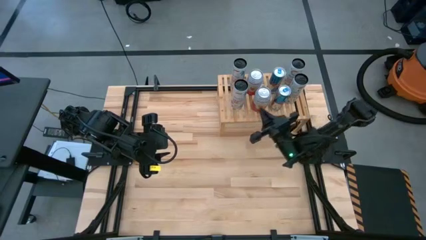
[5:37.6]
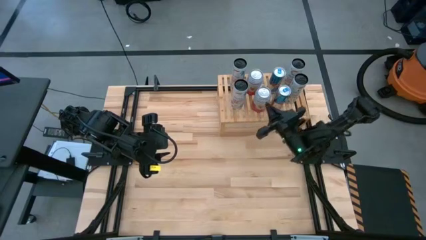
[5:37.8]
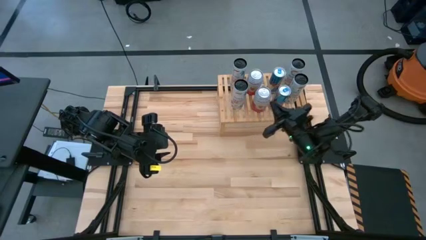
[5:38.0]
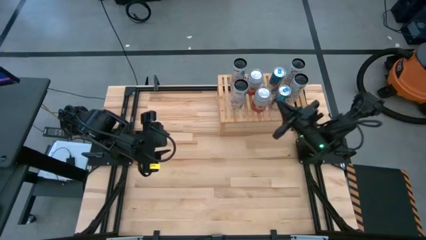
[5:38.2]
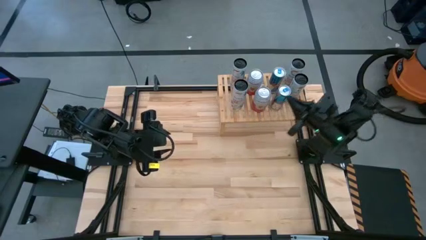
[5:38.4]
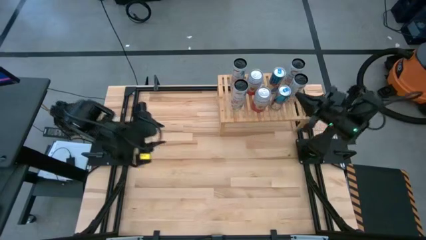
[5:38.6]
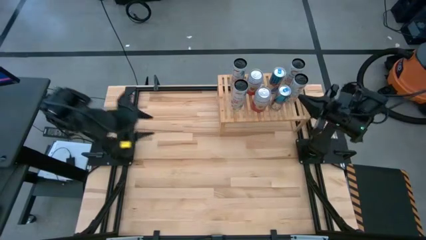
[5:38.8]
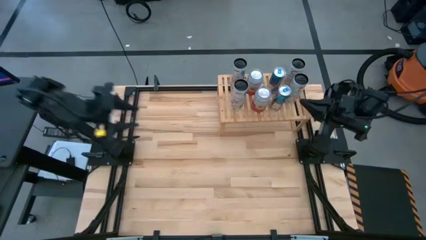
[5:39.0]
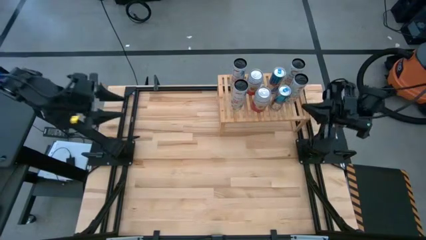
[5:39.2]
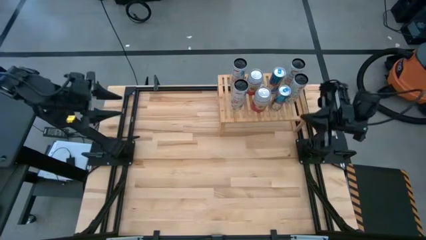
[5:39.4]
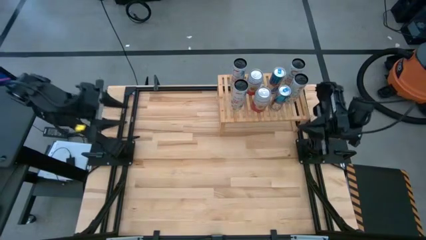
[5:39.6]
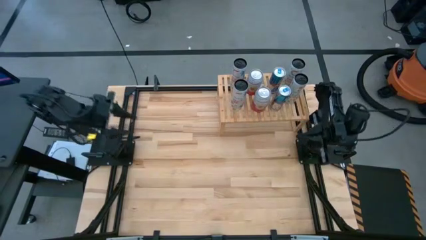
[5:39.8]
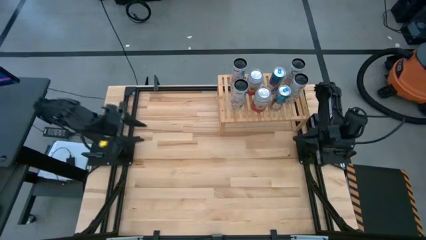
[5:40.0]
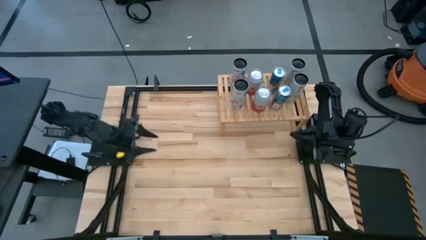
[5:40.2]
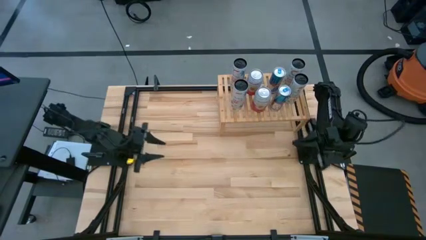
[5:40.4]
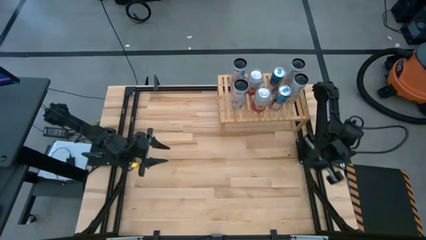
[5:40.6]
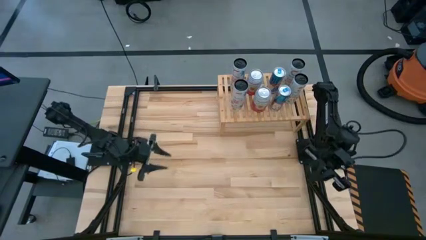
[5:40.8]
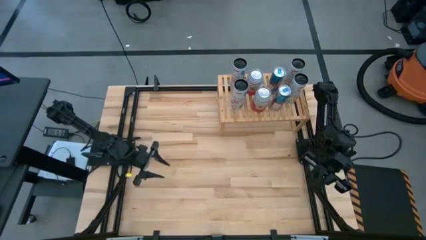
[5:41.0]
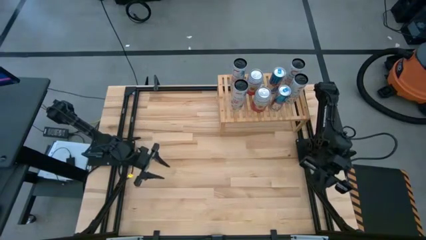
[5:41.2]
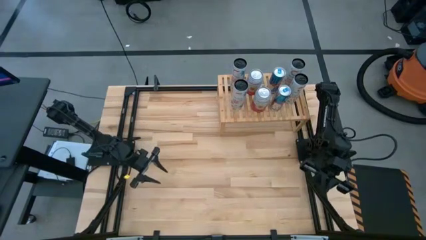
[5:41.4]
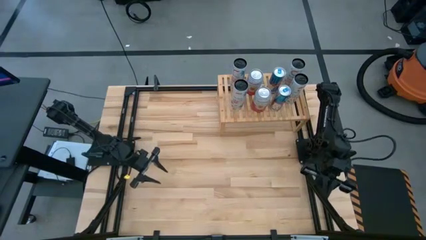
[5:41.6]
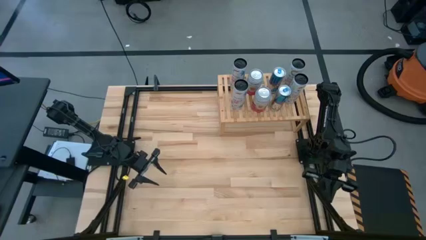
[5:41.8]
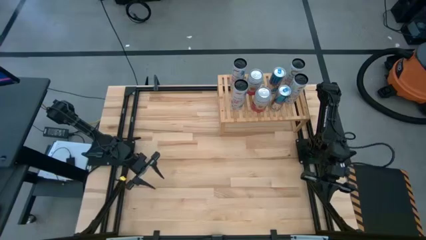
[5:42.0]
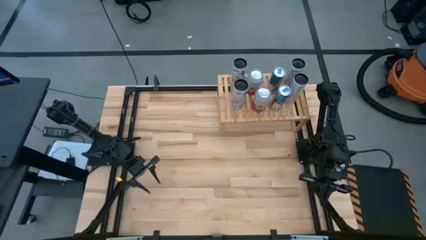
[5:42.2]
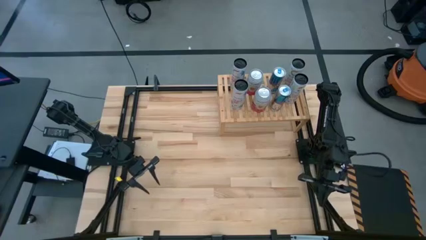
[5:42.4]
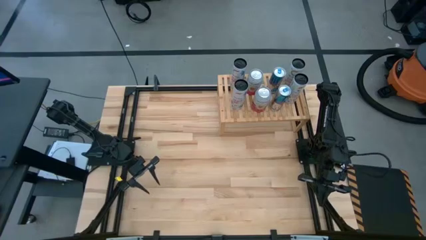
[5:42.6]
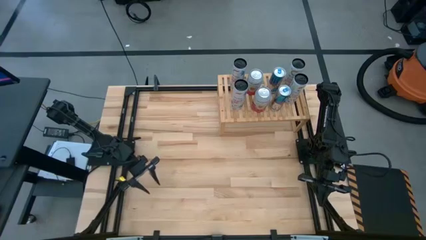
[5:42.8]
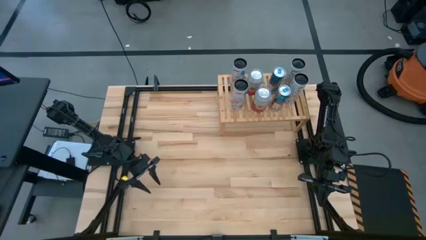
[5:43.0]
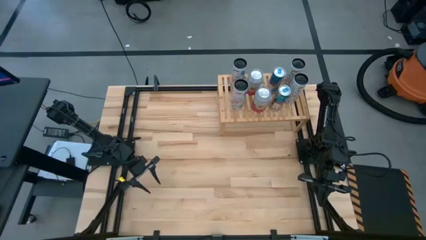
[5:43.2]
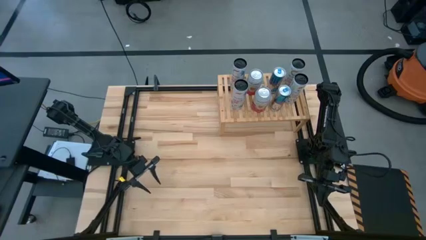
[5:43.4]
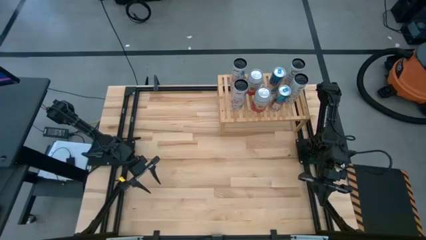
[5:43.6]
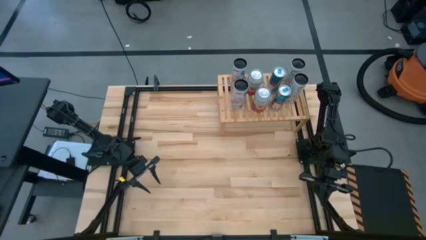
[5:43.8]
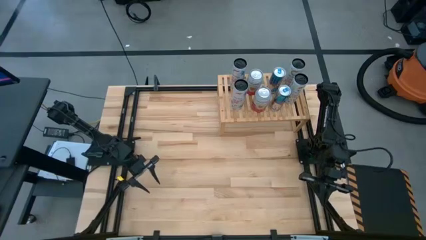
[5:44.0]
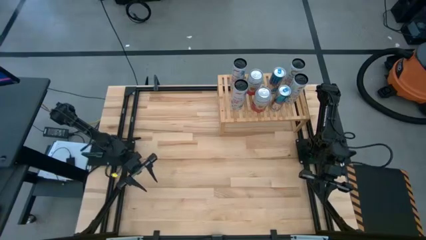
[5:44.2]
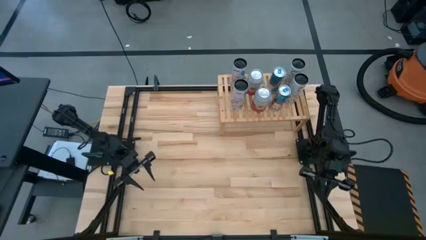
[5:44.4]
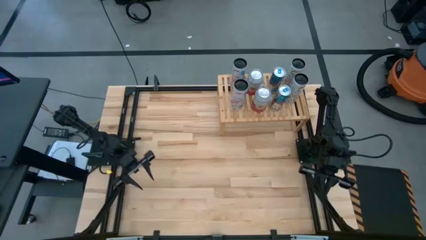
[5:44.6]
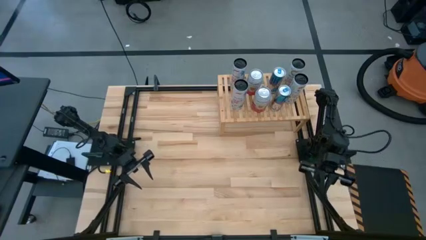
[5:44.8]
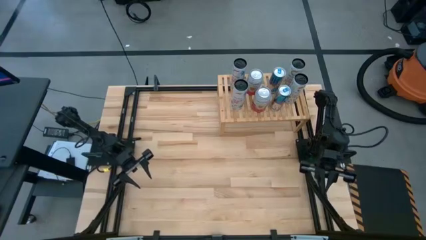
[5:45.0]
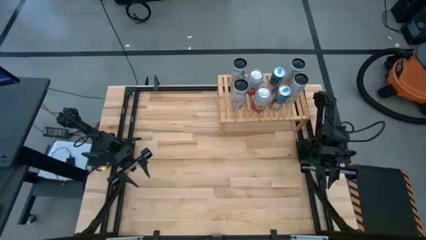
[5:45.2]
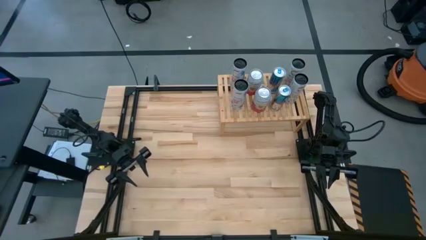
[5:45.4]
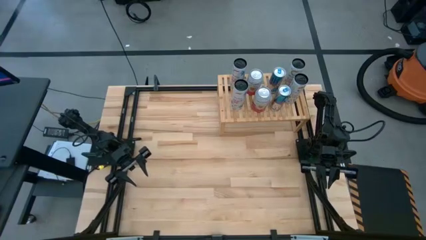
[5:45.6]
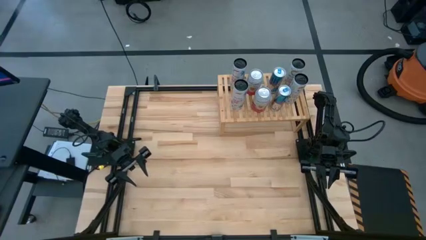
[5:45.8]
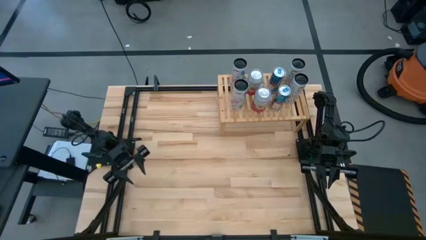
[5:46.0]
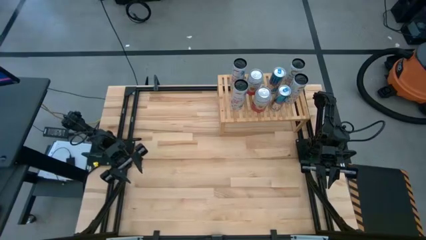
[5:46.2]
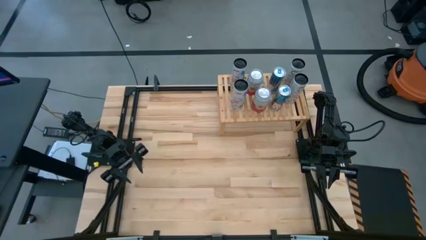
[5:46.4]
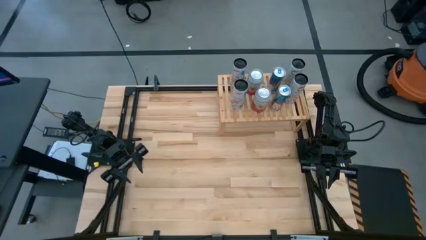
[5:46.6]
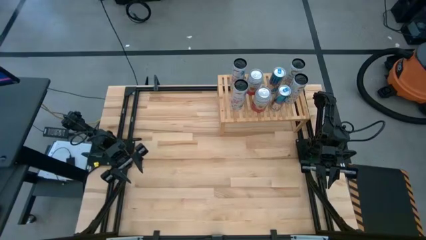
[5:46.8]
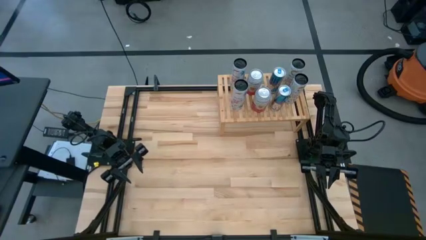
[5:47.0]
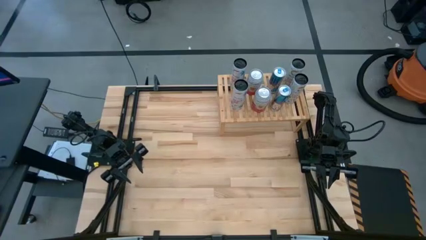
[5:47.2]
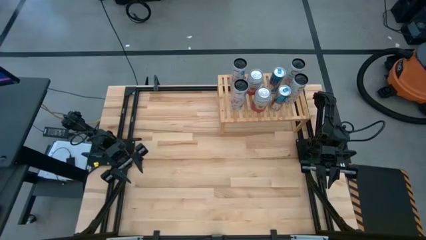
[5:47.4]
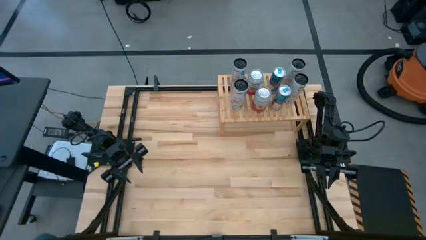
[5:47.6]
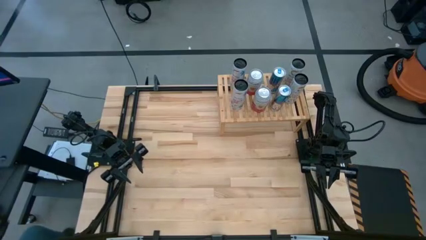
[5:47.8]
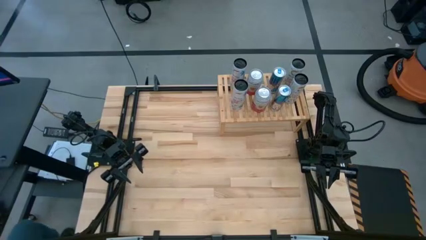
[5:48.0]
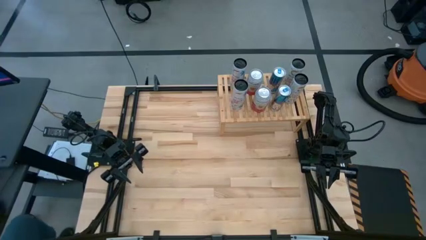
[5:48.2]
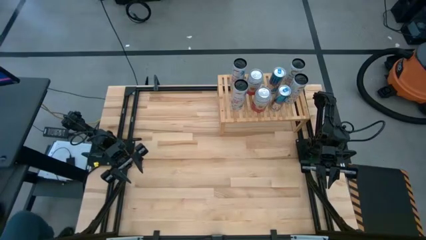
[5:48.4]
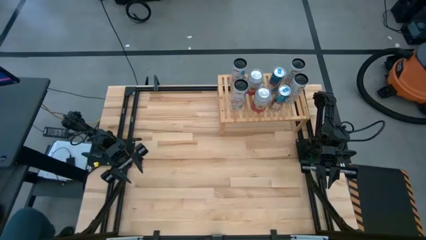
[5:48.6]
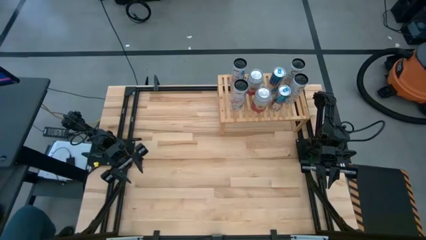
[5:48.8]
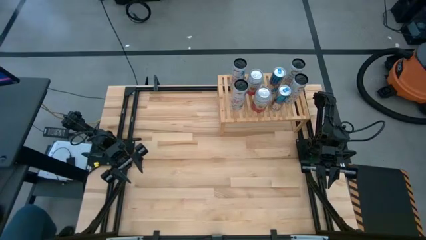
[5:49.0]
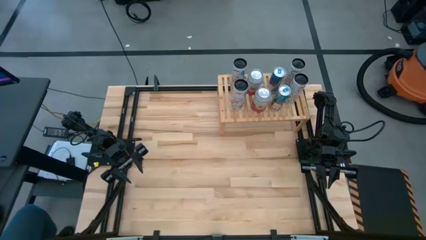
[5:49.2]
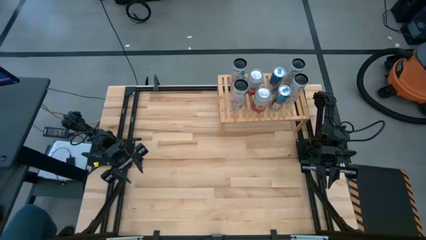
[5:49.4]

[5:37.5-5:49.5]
Task: Place canned beverage on shelf
Return to Home Position
